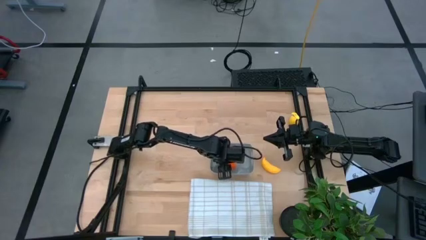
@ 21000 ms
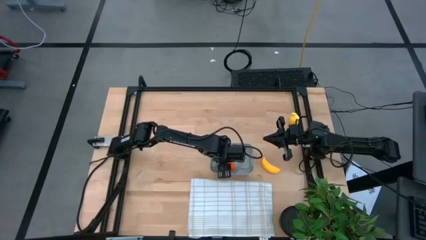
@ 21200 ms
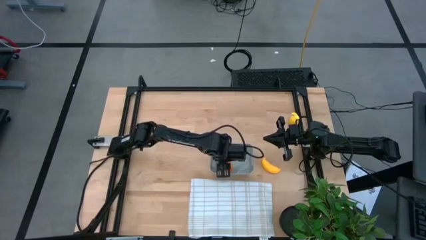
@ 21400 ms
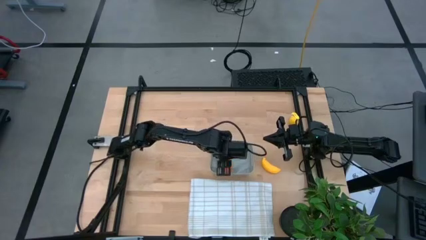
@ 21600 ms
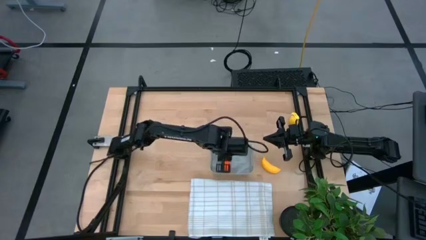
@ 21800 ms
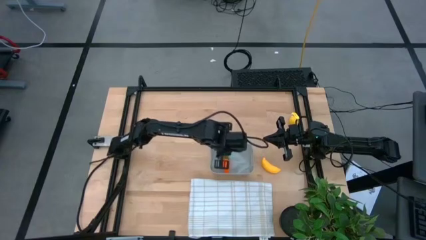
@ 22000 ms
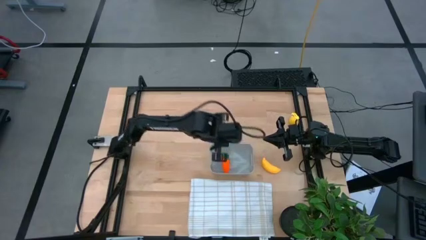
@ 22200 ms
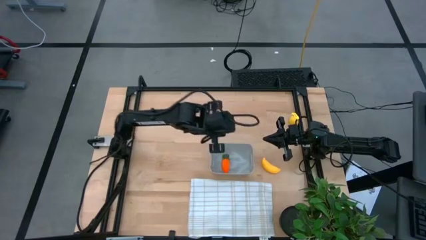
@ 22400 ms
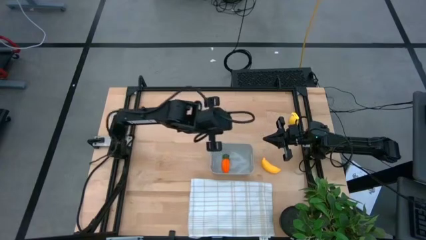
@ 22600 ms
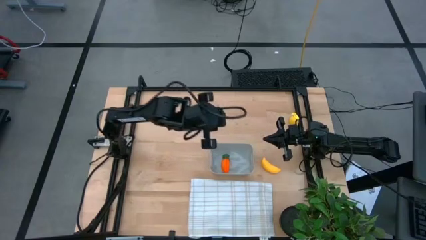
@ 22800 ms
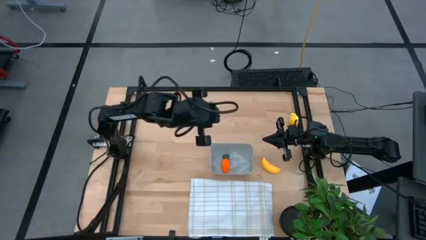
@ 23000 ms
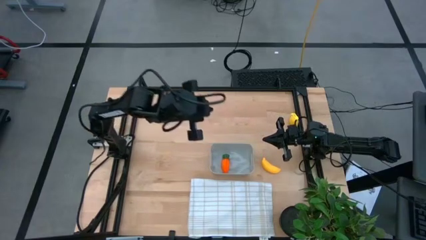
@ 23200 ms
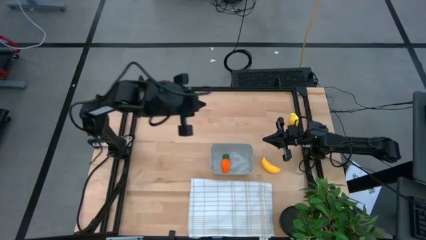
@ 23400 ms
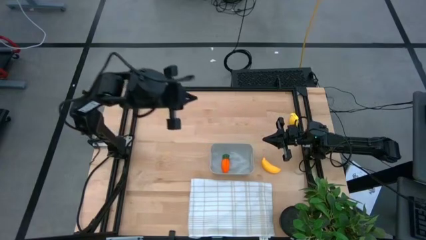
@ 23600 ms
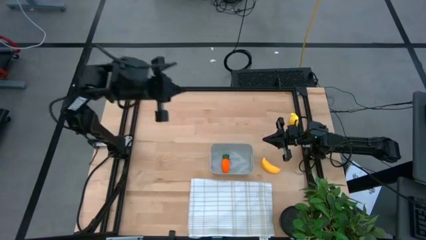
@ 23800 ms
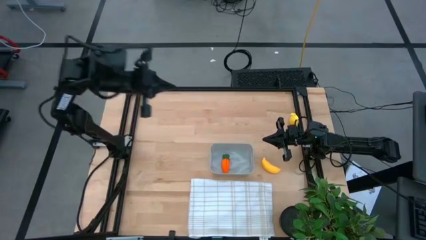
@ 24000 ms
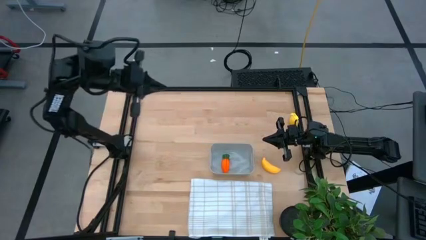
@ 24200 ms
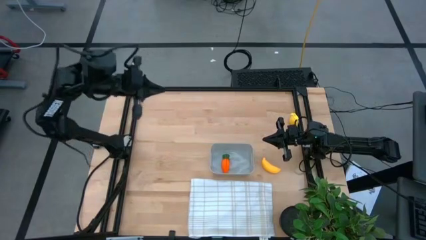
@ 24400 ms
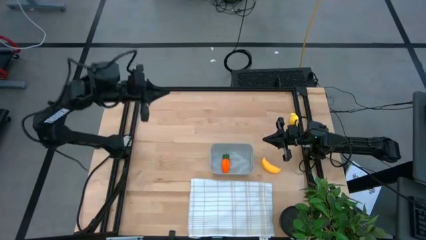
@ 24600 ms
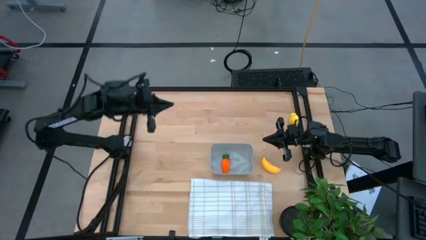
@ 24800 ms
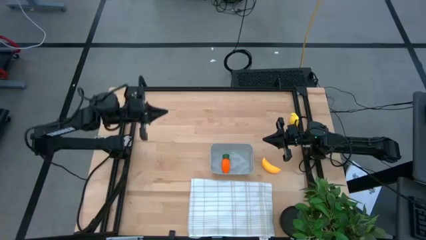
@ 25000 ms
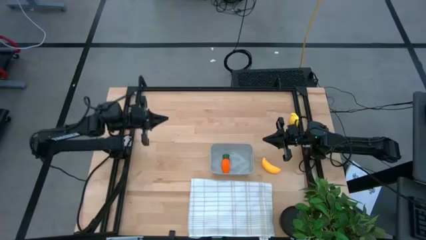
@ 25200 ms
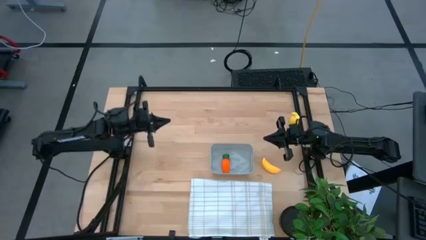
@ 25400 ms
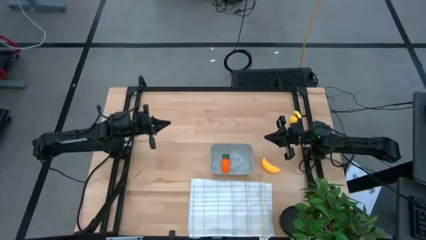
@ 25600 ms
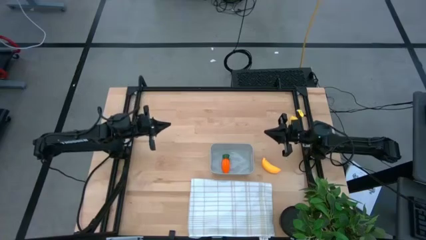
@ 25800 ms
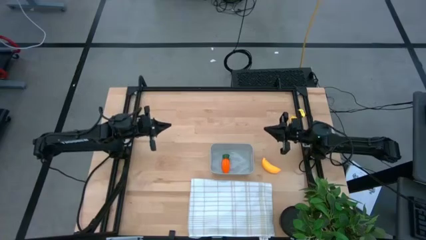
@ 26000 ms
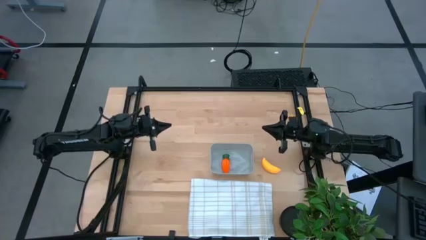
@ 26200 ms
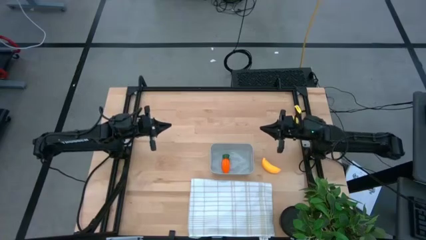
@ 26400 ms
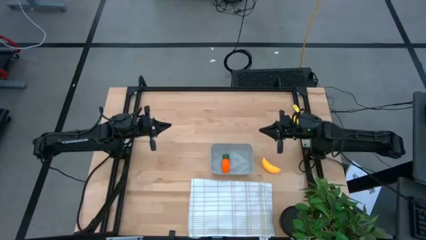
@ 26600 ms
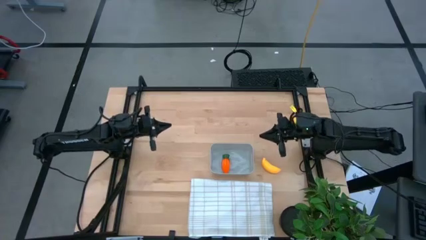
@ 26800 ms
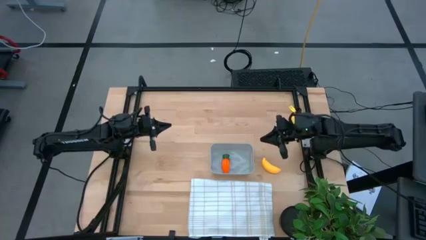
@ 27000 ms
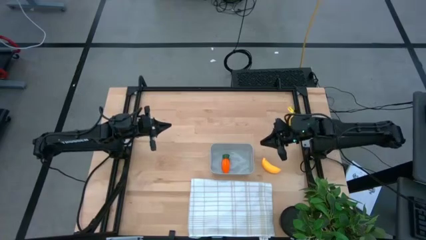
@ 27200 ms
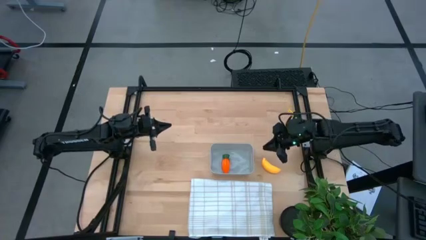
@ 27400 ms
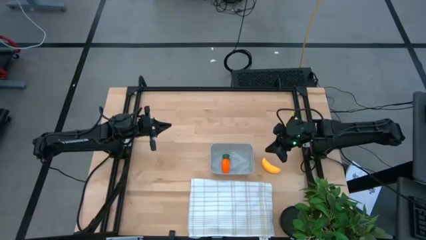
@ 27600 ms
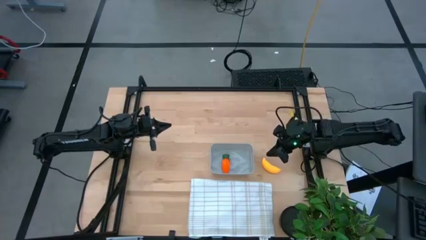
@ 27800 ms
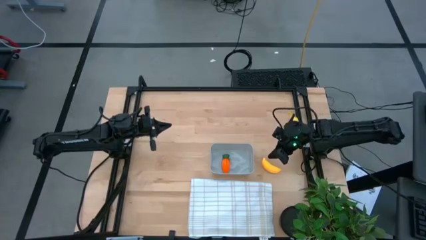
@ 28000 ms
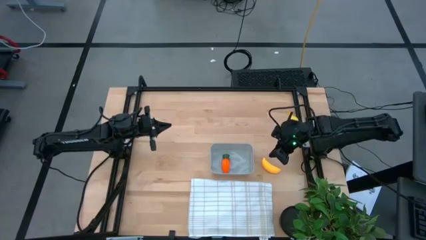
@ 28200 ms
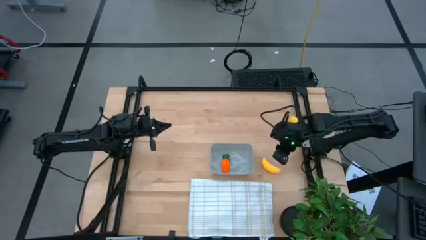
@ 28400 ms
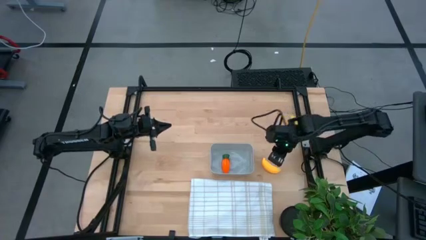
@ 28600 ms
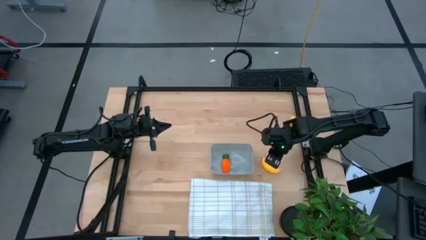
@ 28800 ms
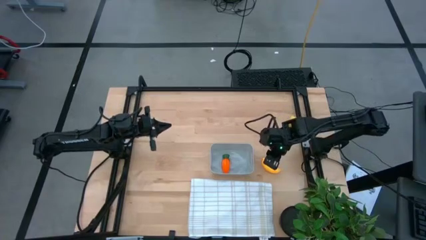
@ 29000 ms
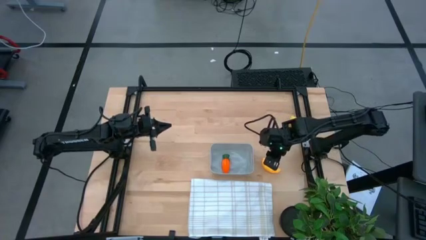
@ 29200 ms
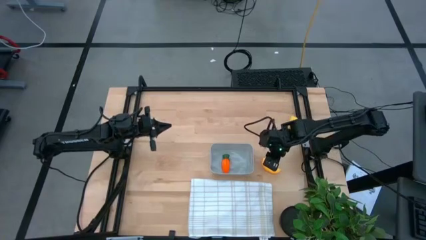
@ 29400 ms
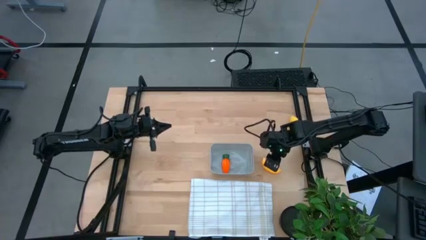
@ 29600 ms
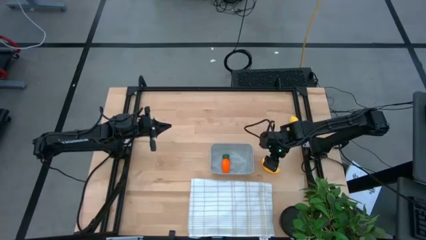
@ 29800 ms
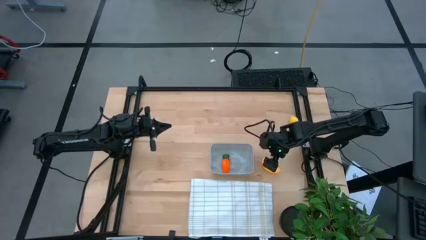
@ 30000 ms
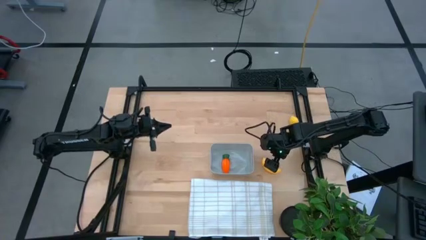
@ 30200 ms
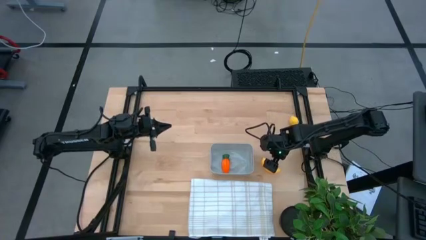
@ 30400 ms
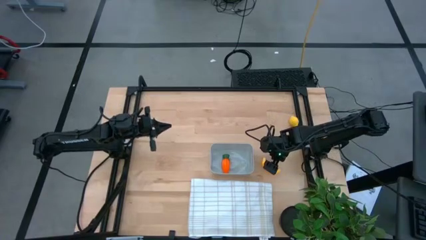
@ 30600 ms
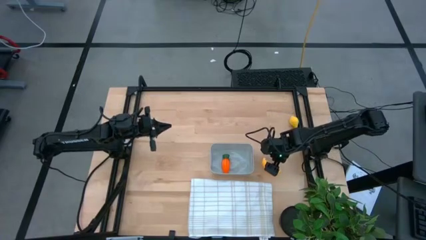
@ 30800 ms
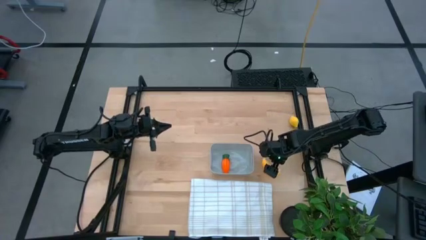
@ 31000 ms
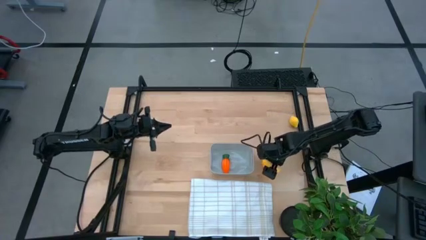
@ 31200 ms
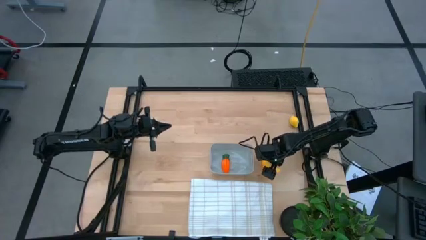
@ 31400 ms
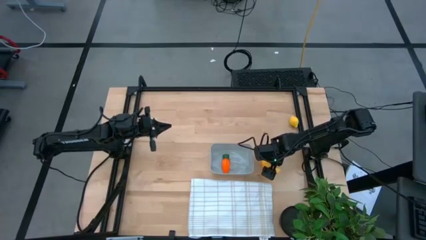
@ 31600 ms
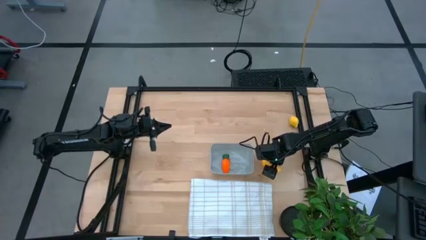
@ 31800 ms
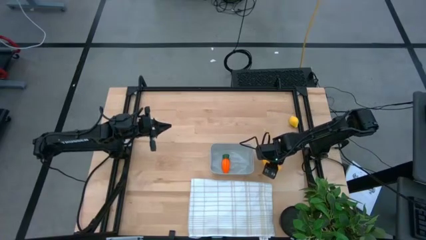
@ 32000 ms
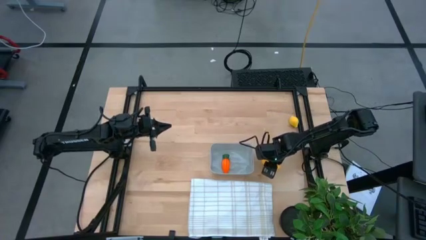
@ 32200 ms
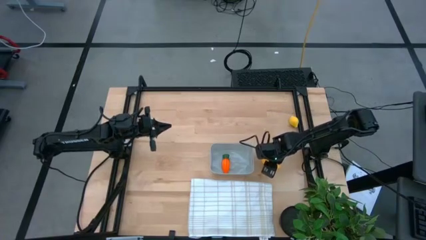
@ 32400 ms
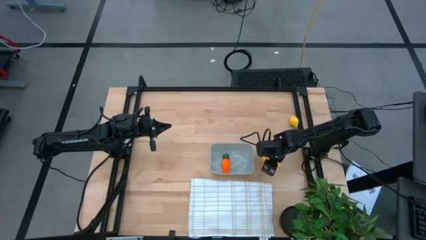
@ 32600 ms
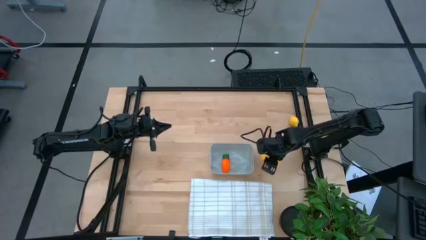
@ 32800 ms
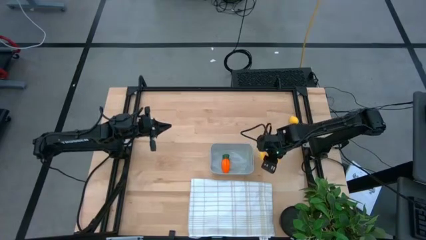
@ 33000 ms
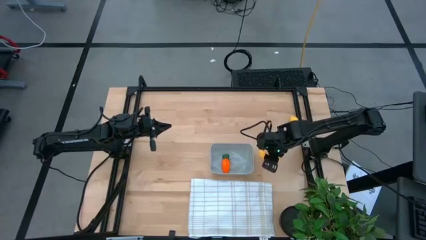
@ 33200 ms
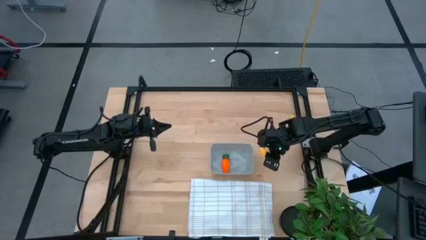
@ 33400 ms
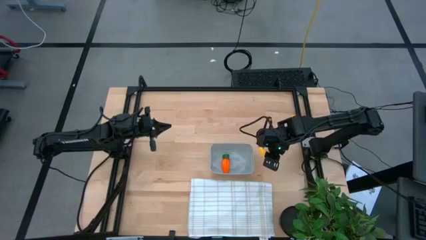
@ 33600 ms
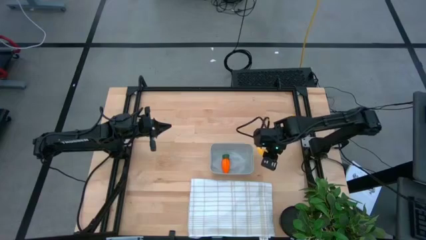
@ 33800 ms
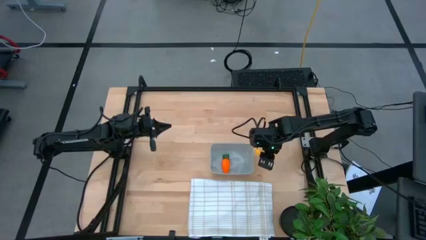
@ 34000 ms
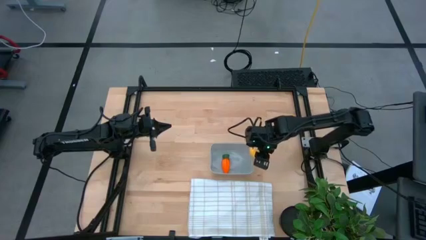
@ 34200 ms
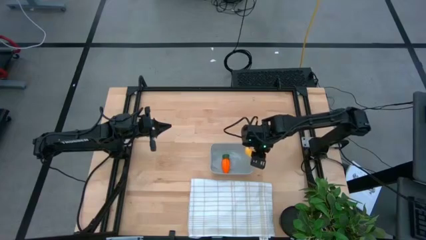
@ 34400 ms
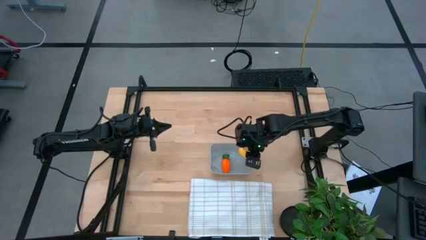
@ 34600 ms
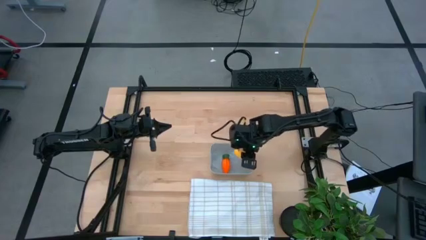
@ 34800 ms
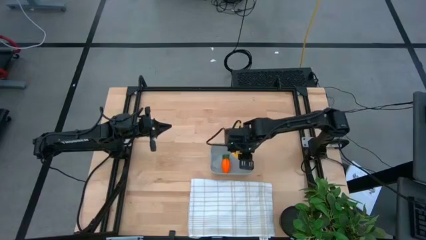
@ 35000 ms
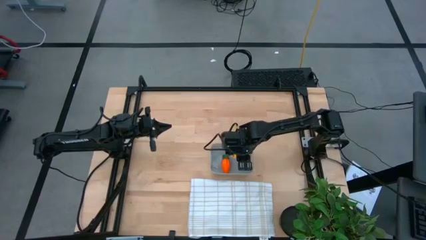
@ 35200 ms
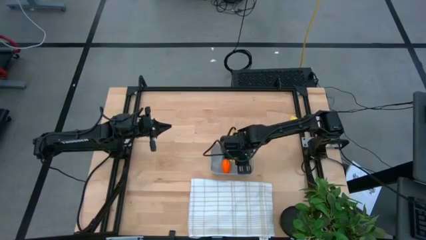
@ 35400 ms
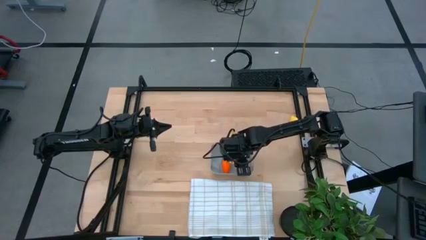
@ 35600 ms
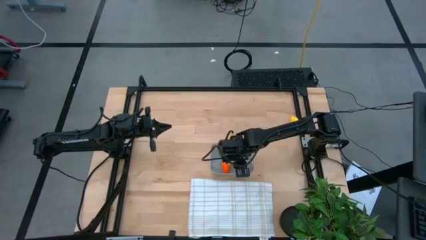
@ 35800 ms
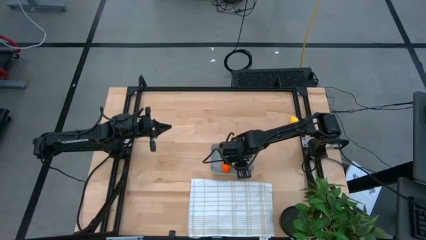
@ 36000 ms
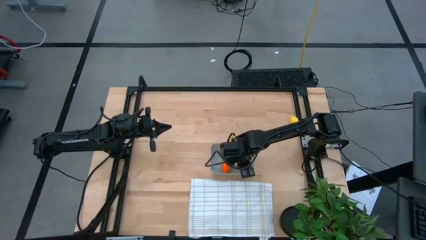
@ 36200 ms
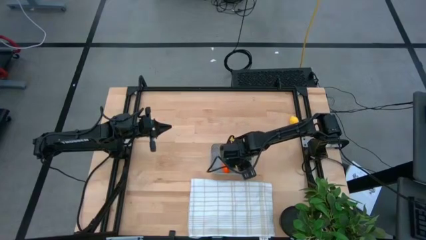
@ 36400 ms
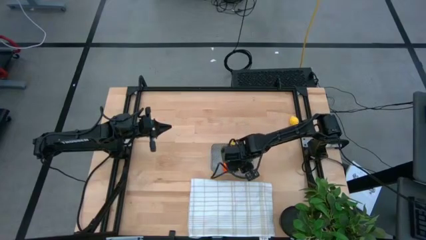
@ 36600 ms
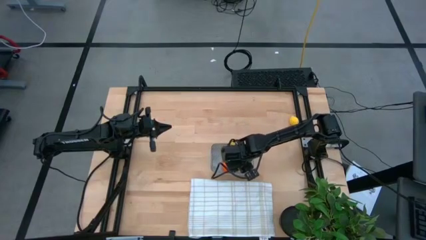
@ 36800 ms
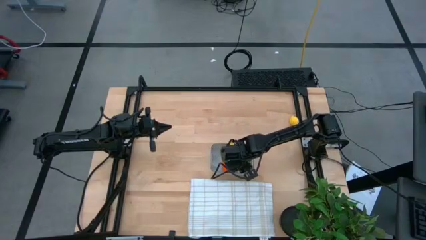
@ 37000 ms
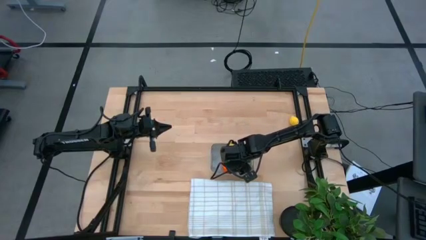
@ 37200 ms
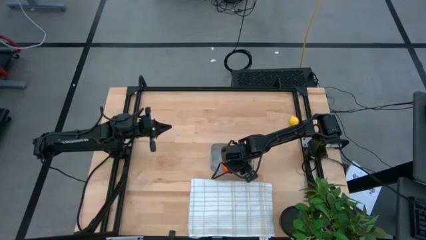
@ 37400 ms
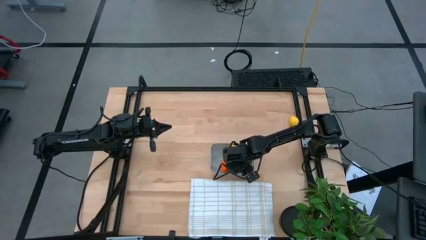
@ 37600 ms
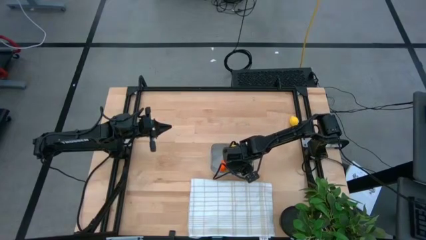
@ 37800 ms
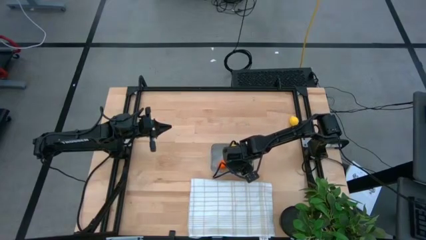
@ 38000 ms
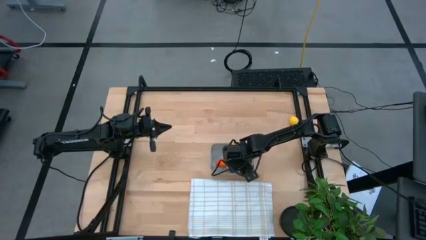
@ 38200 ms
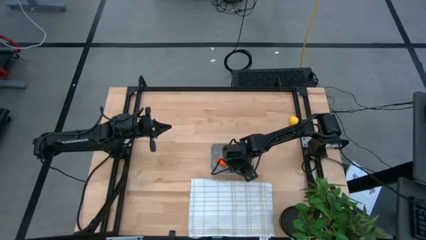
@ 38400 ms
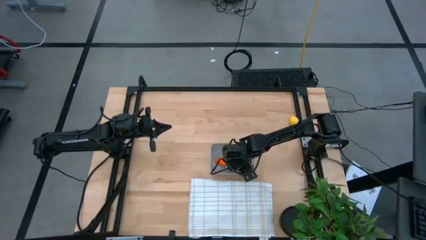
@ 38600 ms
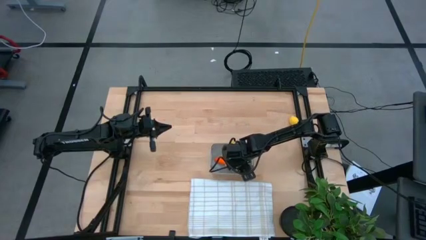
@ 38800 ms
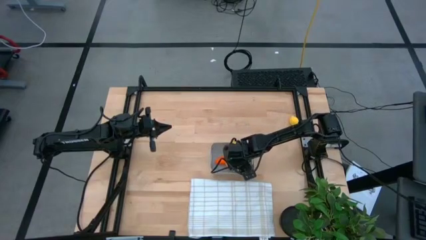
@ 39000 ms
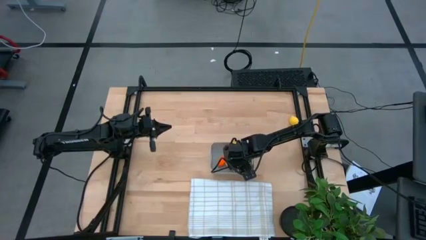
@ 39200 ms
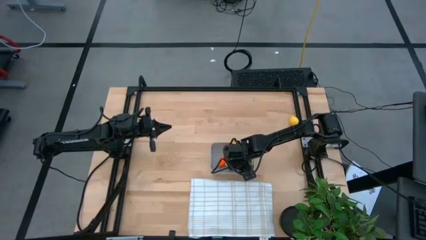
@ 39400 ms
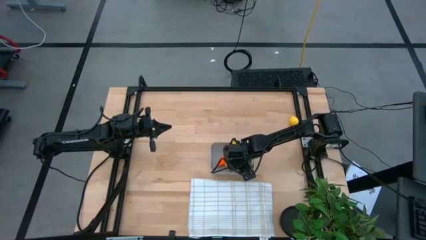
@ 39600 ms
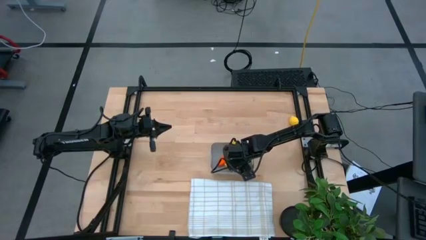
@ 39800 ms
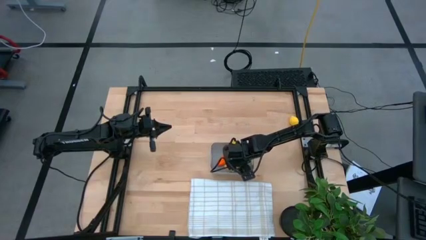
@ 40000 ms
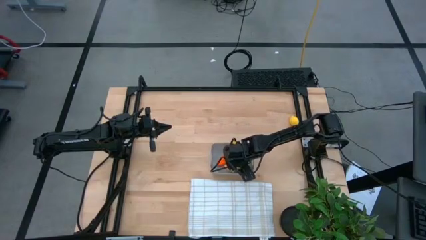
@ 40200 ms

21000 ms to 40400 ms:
Task: Pick and placing Produce into tupperware
Put the banana into the gray bin
